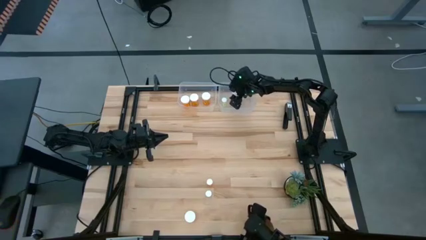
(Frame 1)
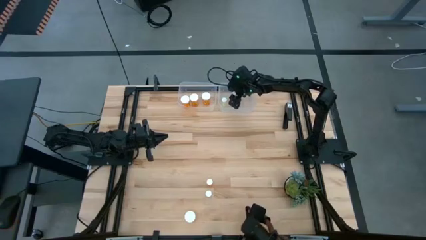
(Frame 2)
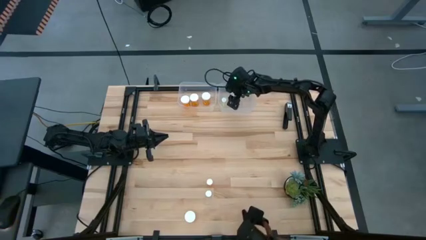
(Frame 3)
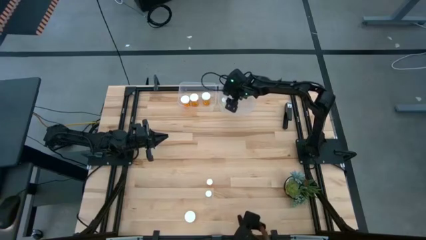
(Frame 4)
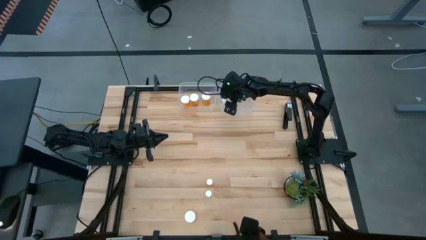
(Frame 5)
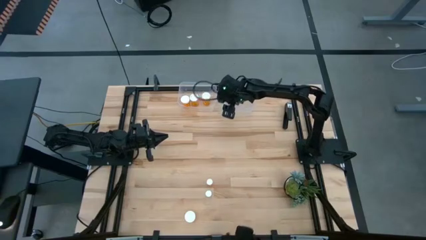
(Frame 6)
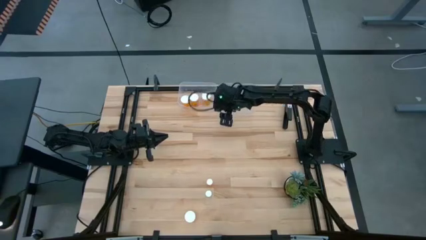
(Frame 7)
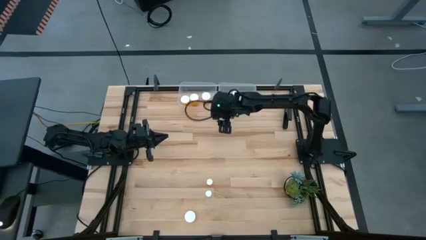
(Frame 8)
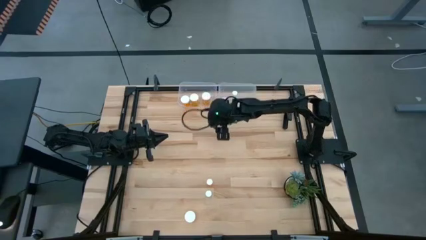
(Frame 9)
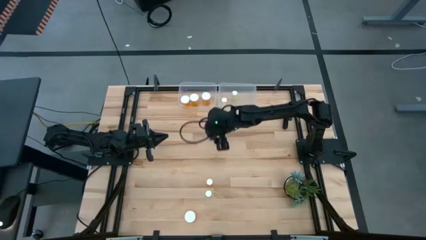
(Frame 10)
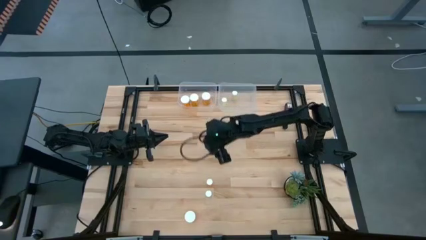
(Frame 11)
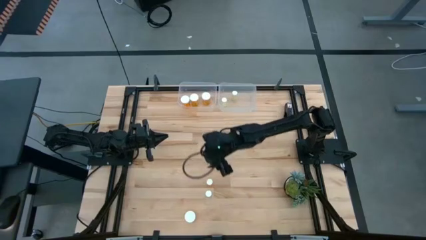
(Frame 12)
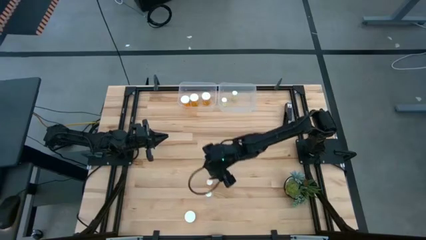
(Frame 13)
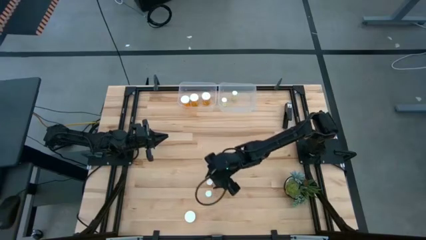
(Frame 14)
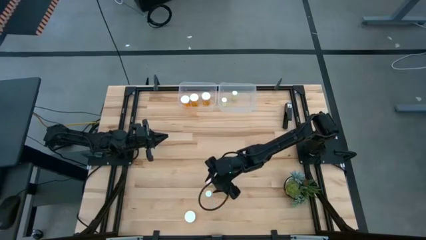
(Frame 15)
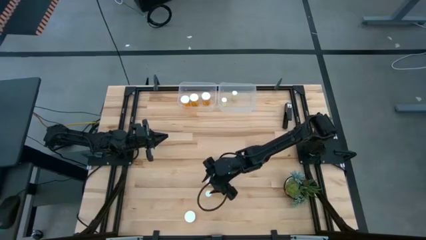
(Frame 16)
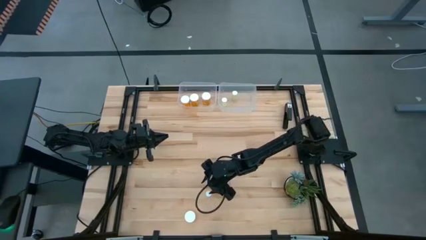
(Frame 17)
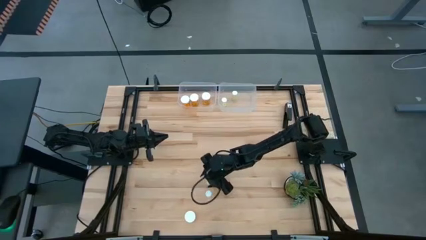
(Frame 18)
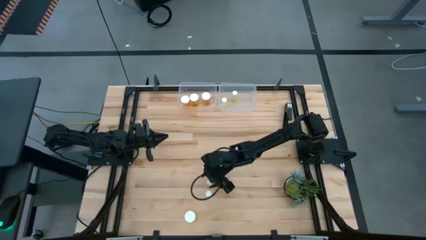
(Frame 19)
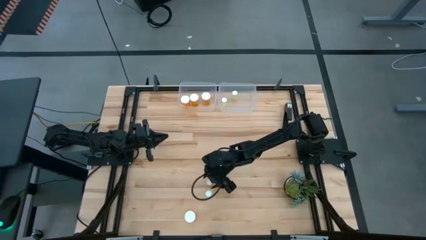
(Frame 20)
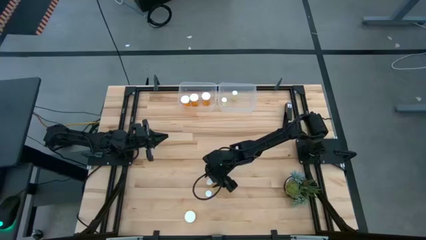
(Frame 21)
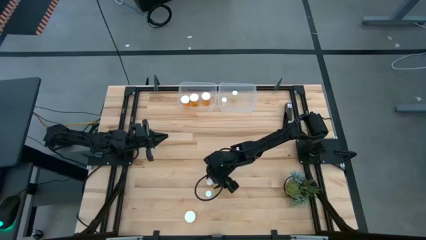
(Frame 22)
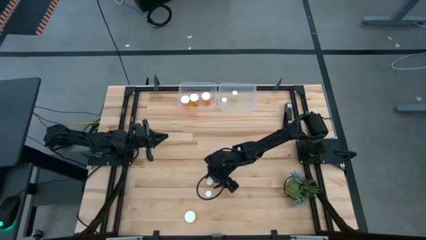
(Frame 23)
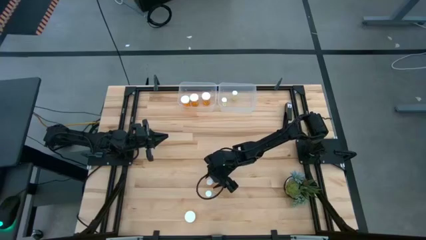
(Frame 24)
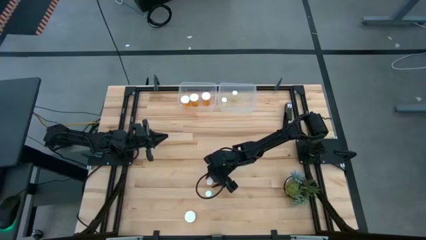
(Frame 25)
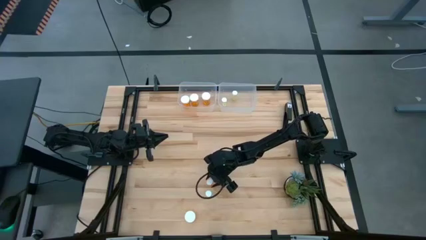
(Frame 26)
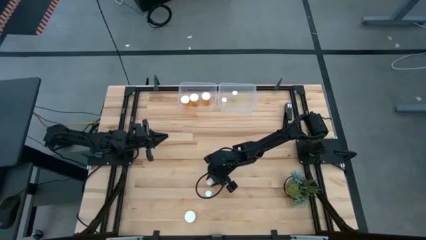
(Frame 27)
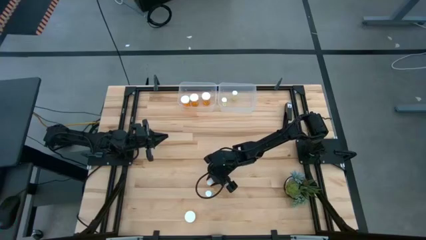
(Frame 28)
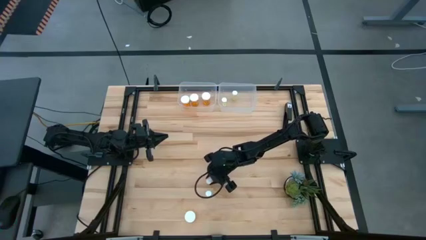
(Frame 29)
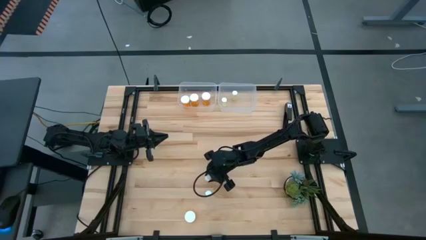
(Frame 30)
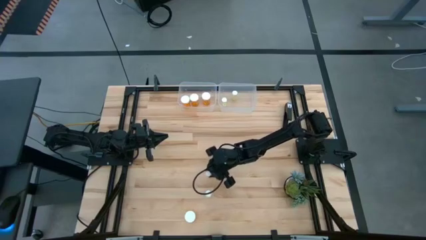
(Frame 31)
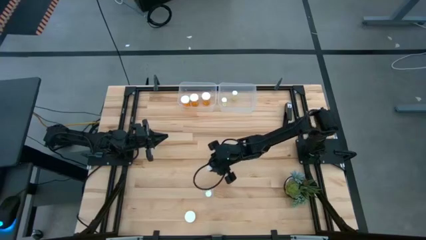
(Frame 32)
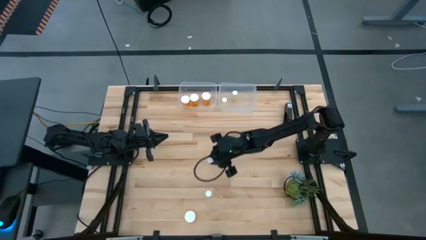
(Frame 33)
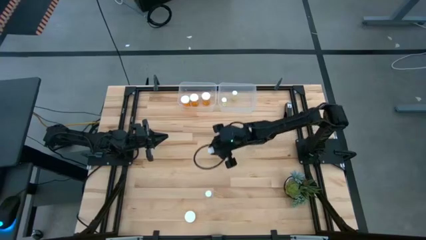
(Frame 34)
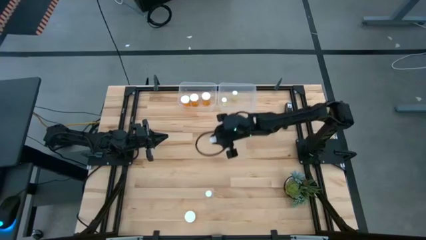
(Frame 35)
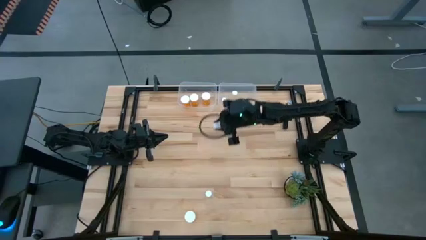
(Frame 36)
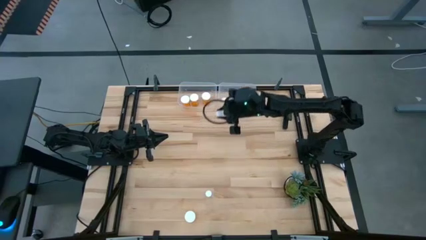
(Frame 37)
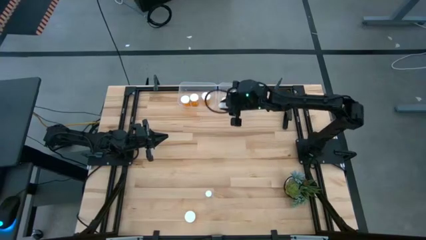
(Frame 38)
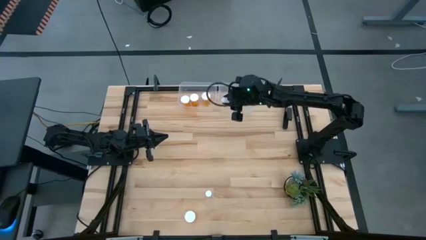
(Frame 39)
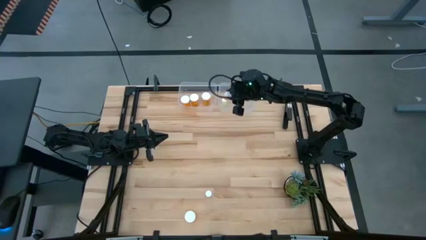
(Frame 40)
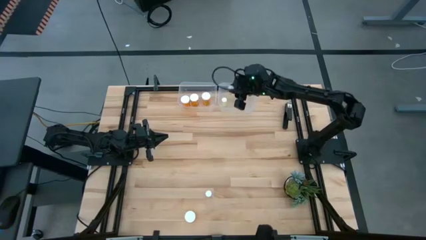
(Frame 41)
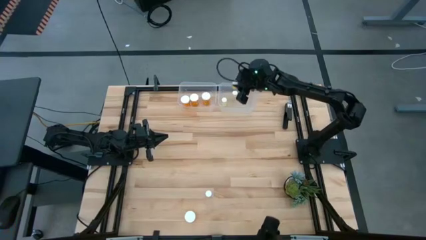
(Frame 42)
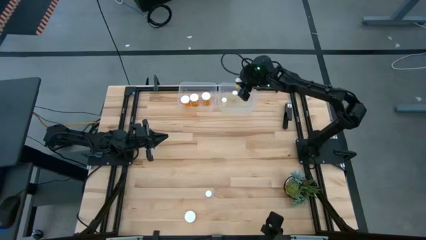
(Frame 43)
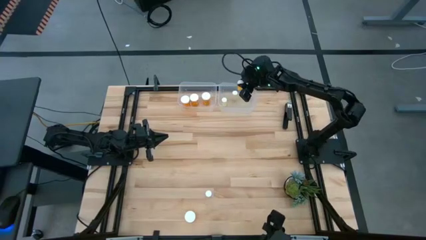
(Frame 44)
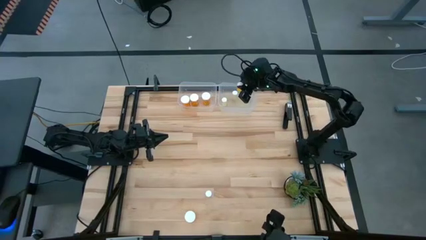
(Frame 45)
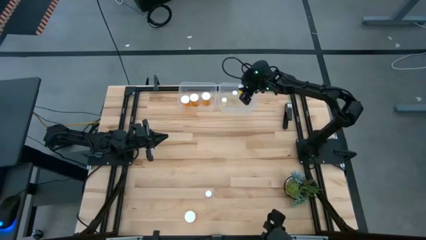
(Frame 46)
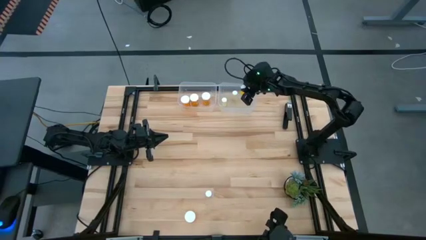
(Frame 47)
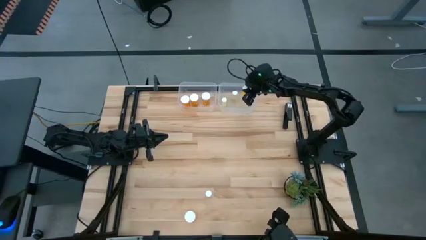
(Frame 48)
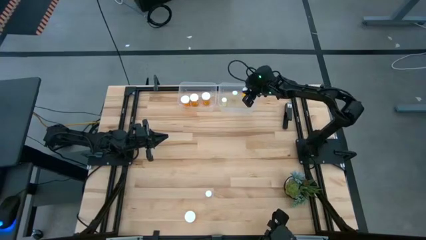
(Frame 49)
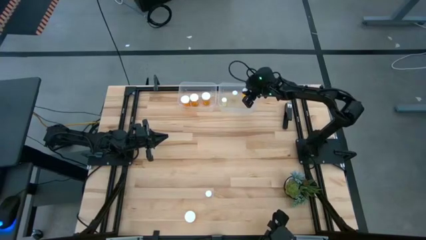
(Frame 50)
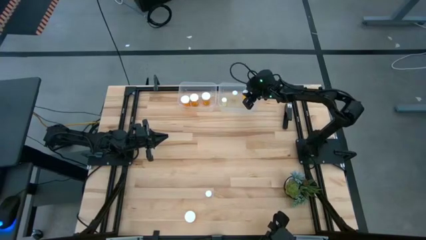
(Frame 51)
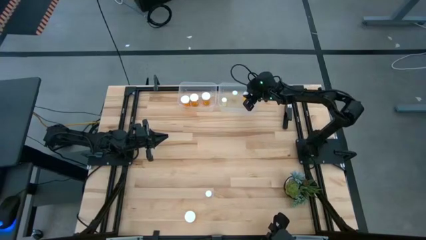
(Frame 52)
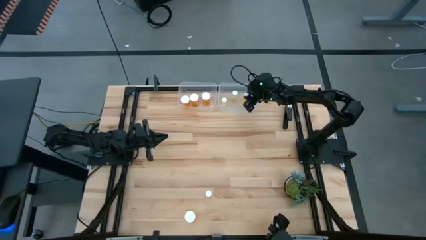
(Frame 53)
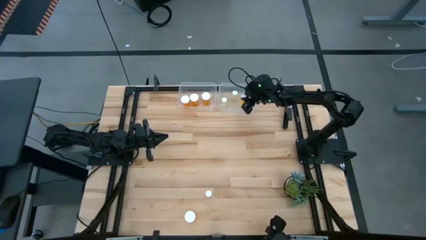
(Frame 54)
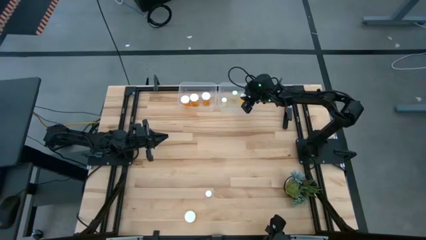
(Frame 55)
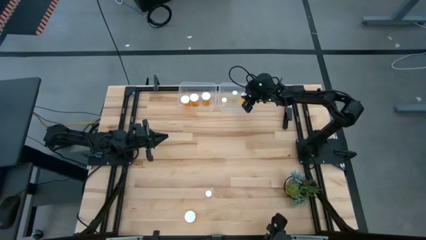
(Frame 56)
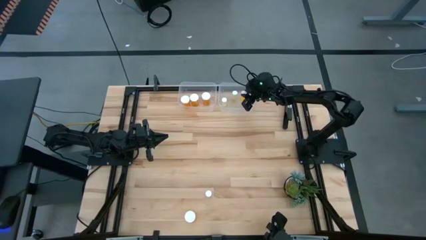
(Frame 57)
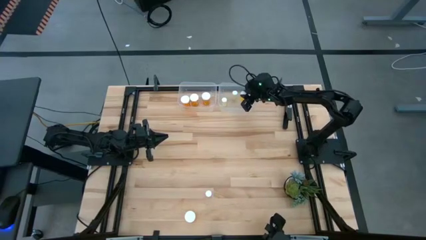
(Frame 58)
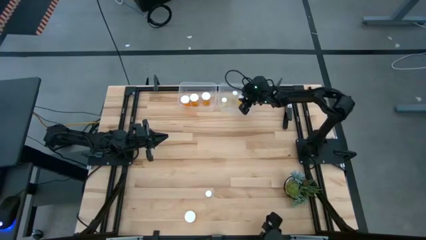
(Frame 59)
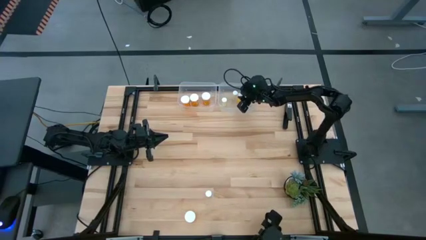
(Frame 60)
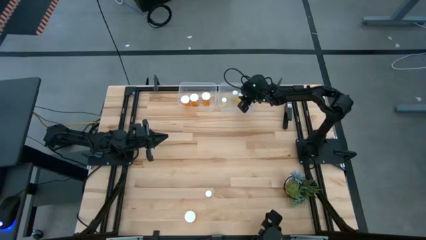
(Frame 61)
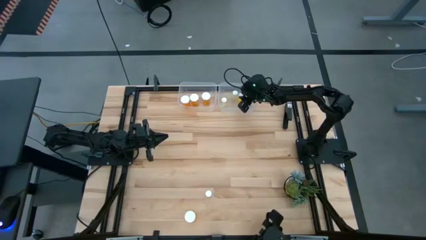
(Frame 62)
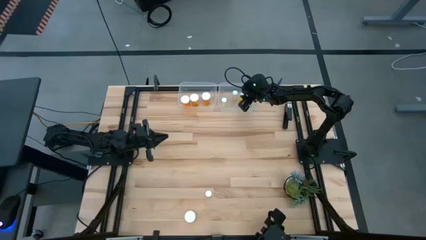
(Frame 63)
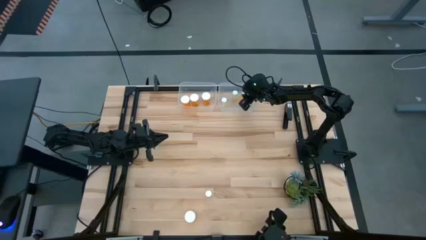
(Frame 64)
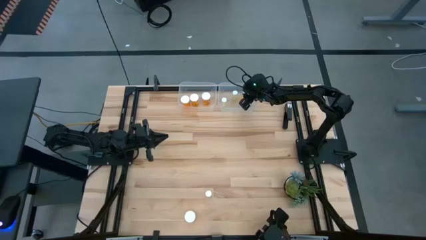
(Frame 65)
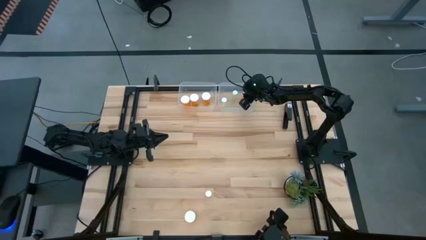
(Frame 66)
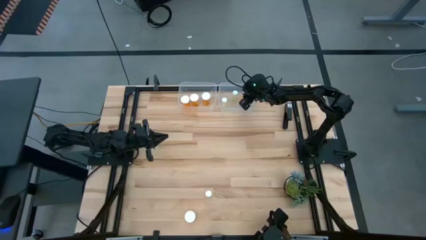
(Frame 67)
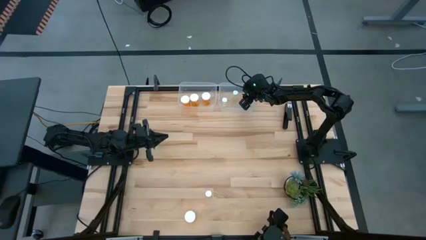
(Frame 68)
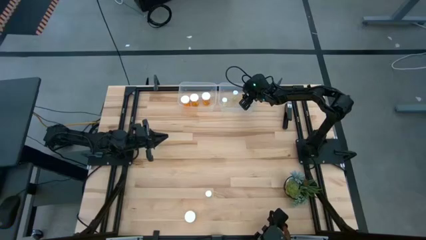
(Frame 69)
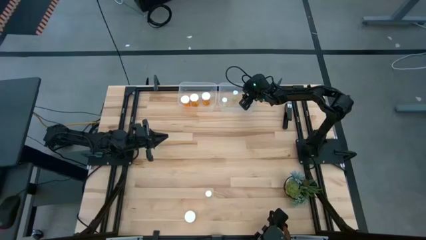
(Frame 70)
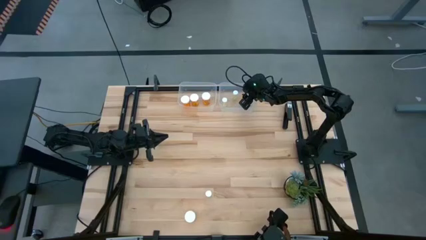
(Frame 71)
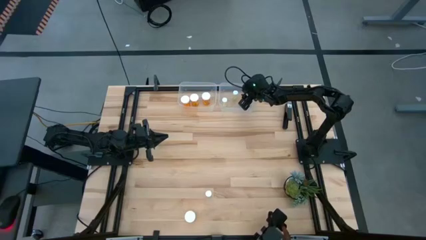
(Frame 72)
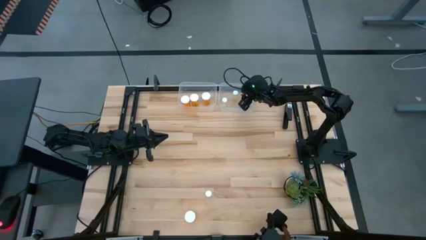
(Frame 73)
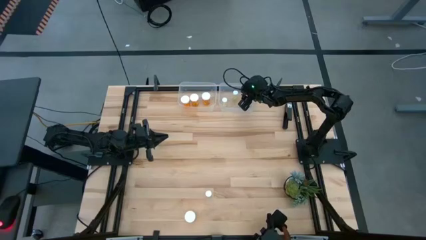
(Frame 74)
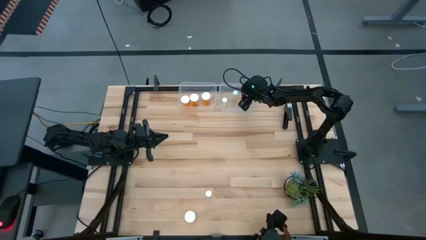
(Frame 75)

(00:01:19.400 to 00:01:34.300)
Task: Pick and place medicine bottles into bin by pill shape (circle, oval)
Put the small orange pill bottle into the right transparent bin

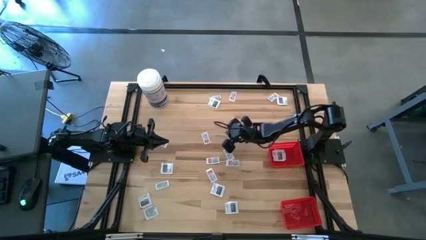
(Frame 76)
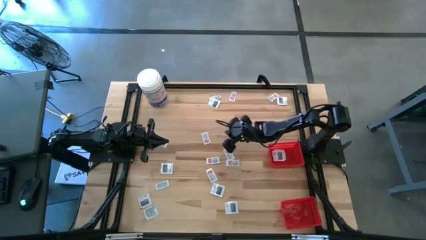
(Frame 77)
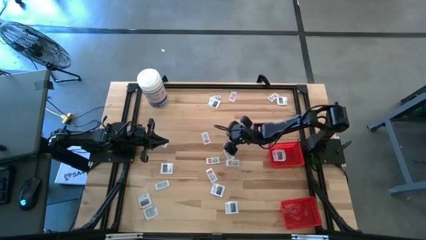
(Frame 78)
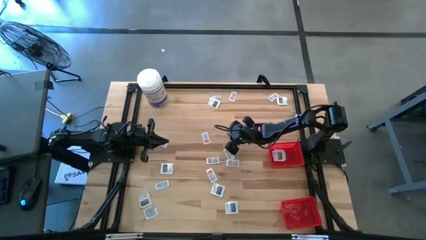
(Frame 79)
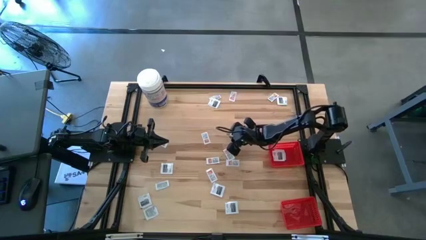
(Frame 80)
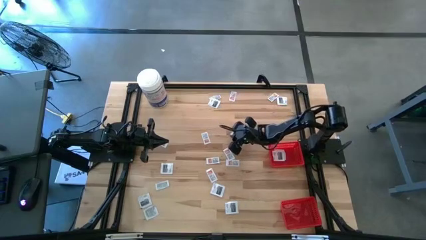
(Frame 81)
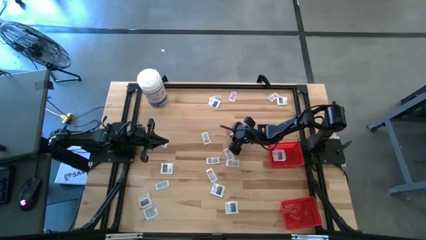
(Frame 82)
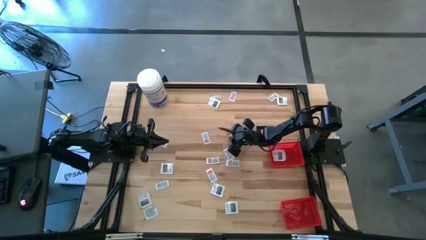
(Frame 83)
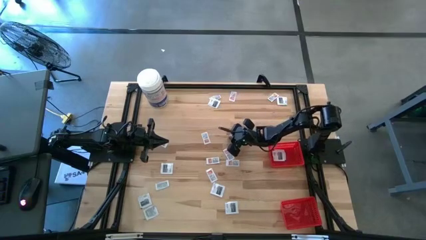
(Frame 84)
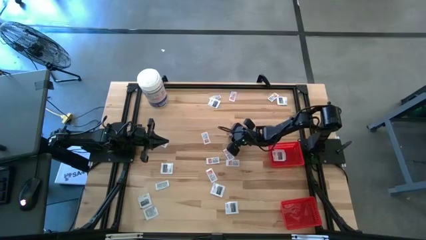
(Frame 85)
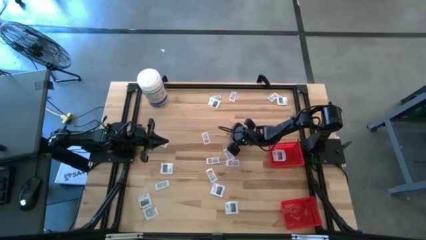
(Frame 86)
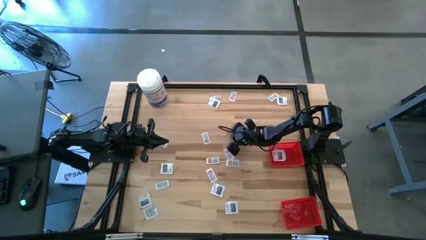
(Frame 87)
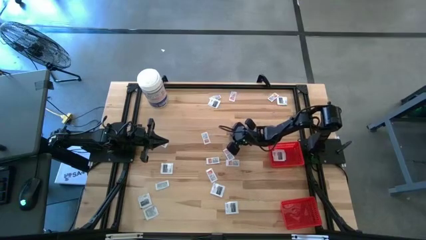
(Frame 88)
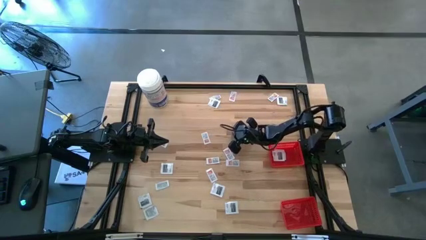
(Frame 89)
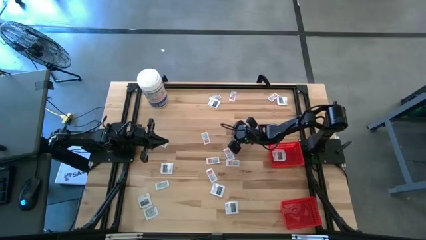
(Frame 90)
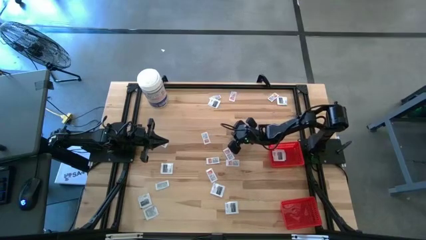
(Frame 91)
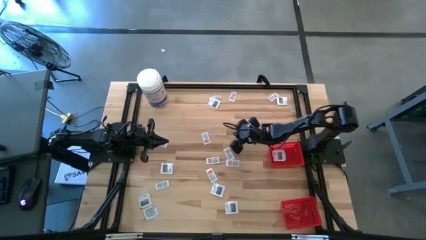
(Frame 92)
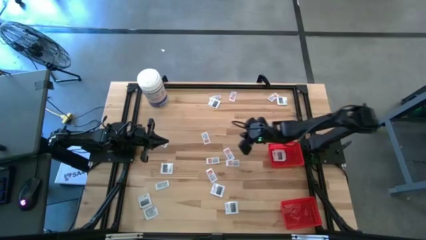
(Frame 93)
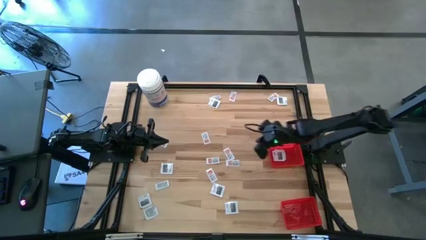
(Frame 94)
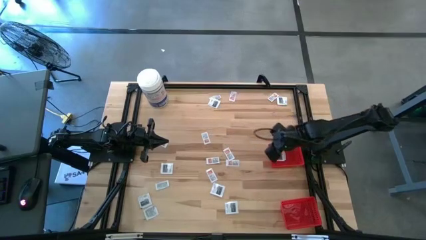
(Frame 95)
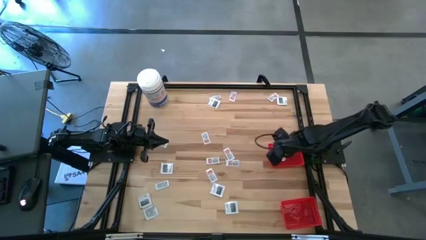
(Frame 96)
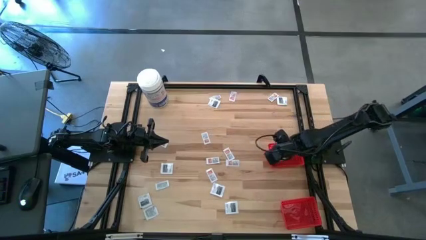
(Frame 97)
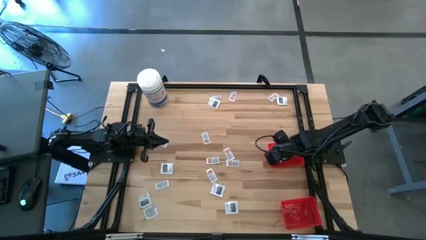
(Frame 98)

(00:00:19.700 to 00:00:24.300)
Task: Pick & Place First Aid Supplies
Put the black towelette pack into the top red basket
